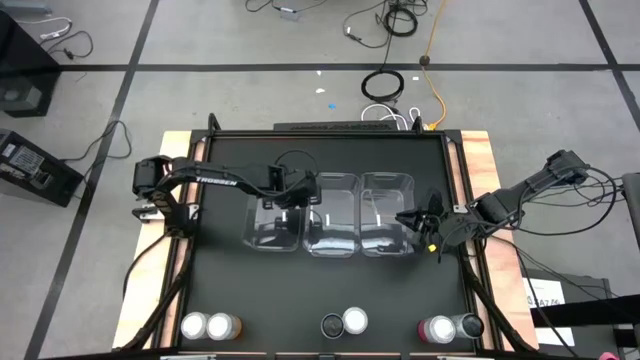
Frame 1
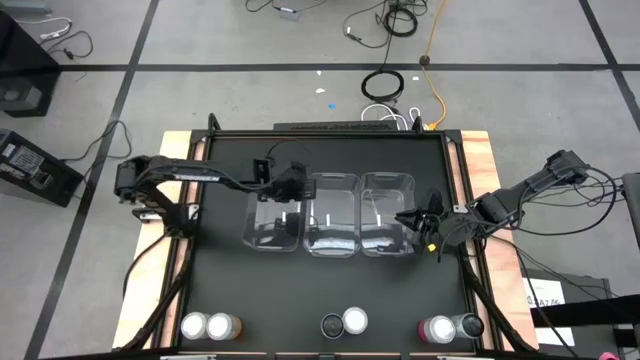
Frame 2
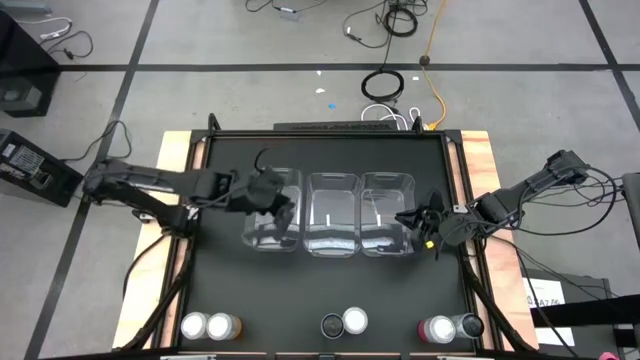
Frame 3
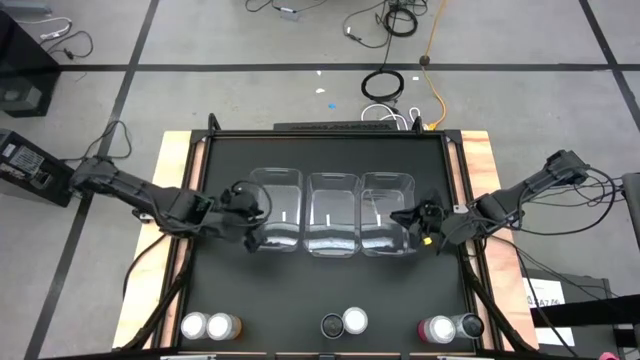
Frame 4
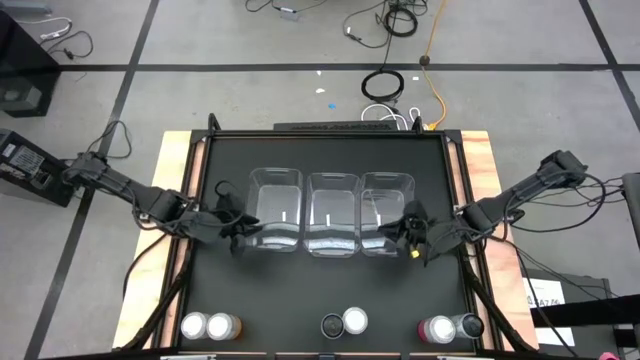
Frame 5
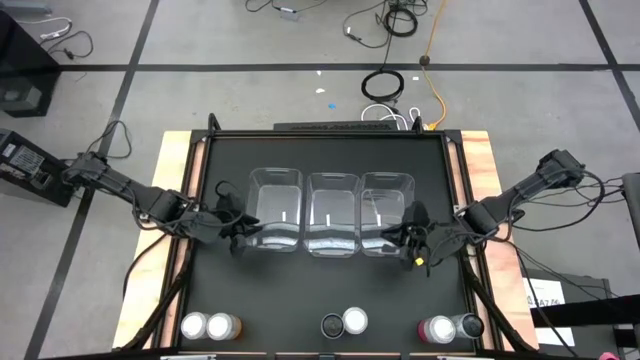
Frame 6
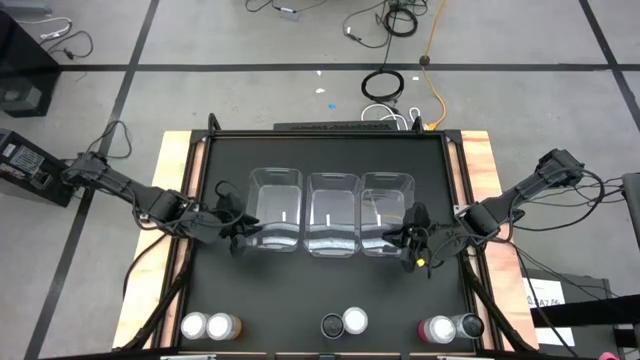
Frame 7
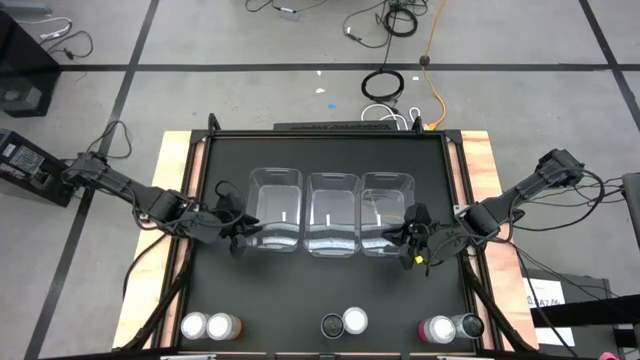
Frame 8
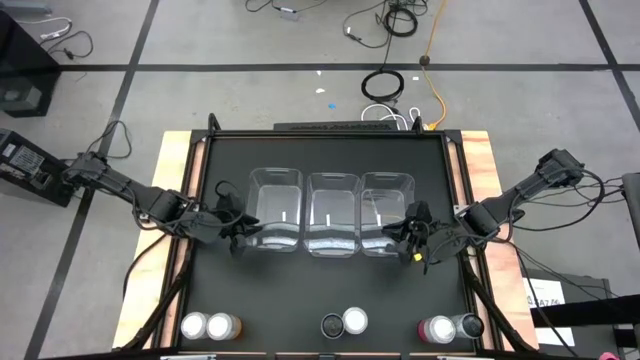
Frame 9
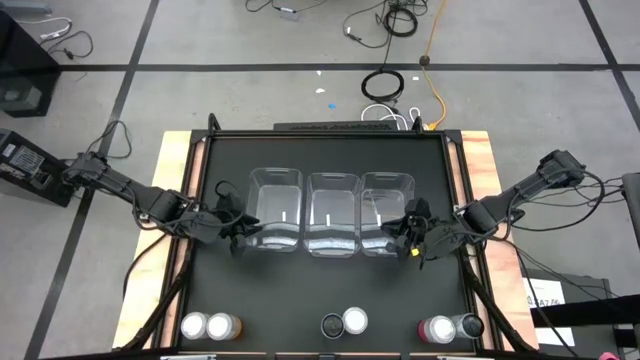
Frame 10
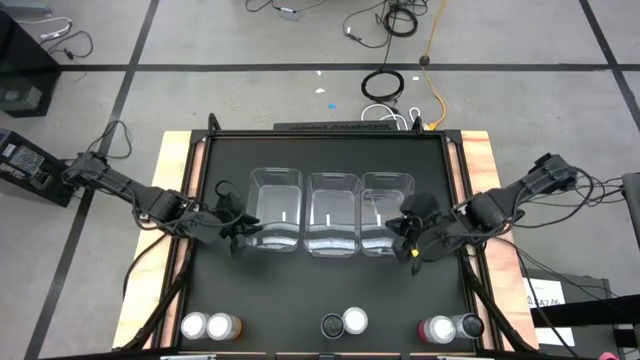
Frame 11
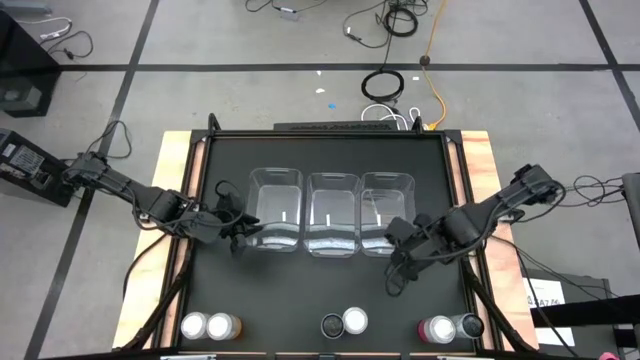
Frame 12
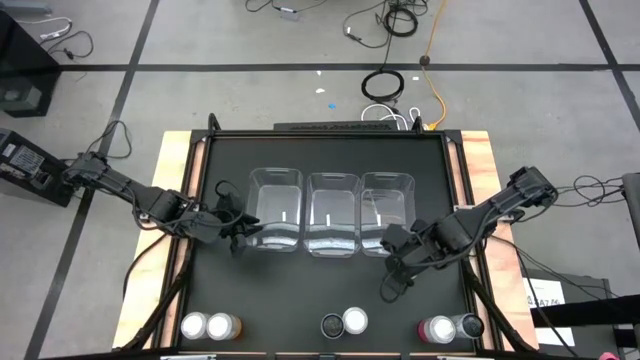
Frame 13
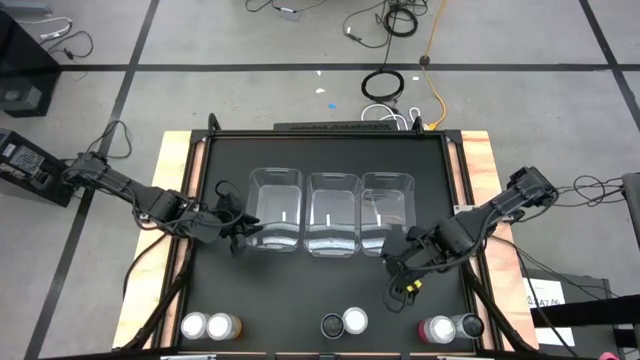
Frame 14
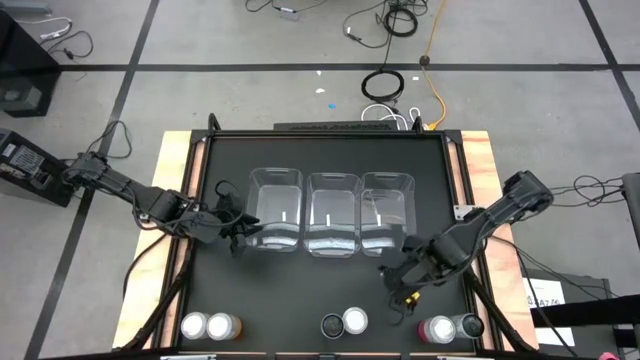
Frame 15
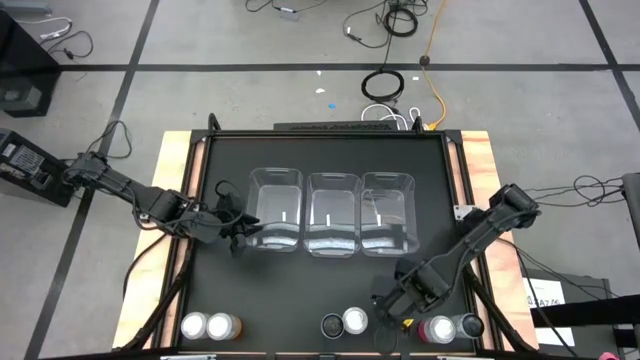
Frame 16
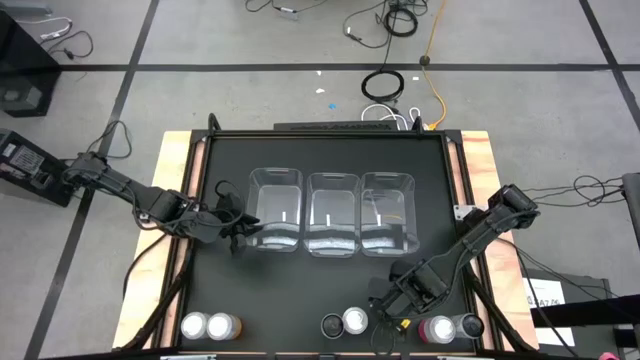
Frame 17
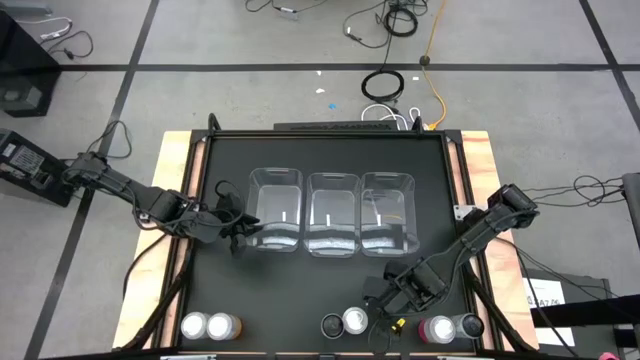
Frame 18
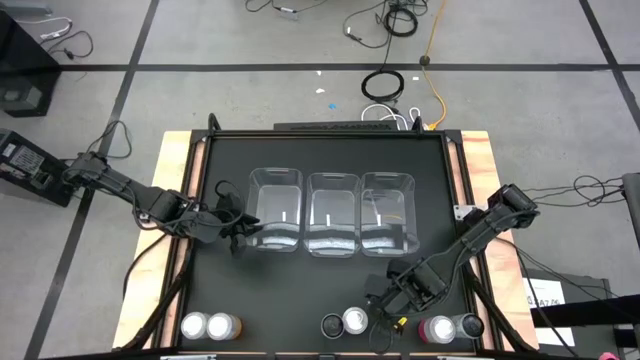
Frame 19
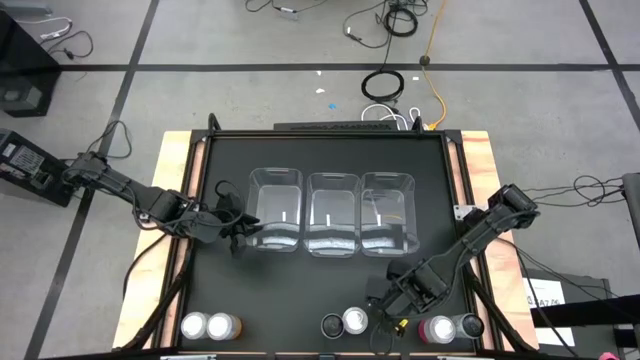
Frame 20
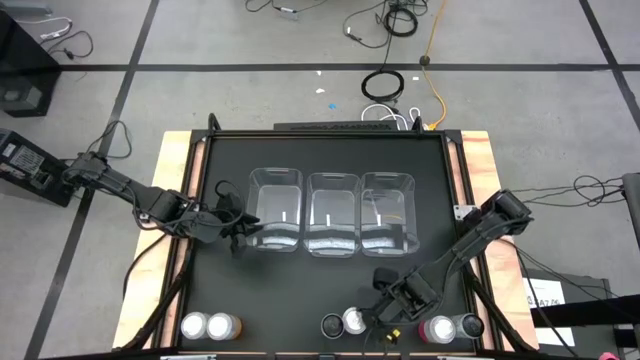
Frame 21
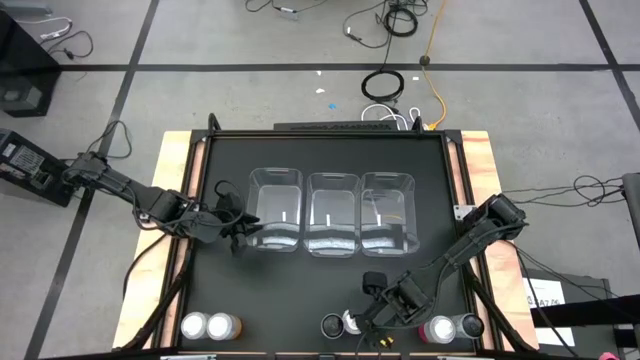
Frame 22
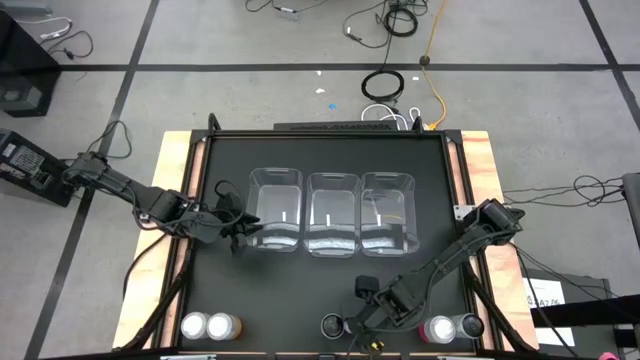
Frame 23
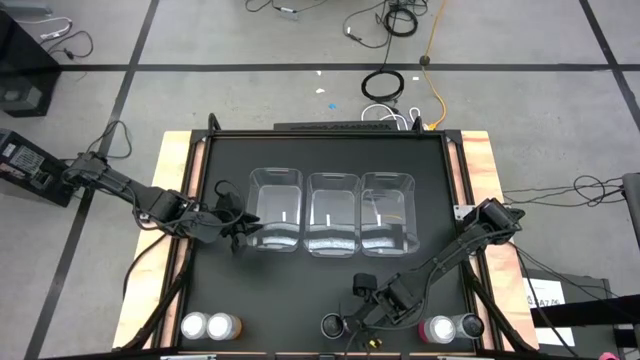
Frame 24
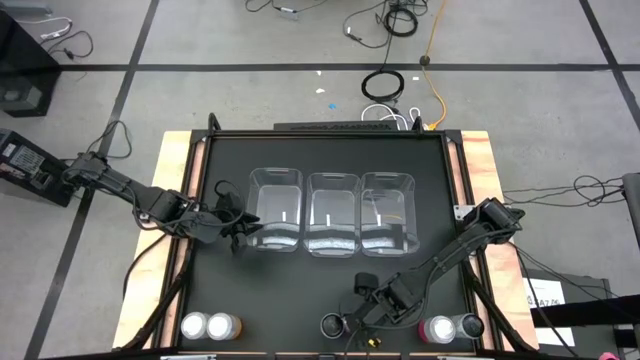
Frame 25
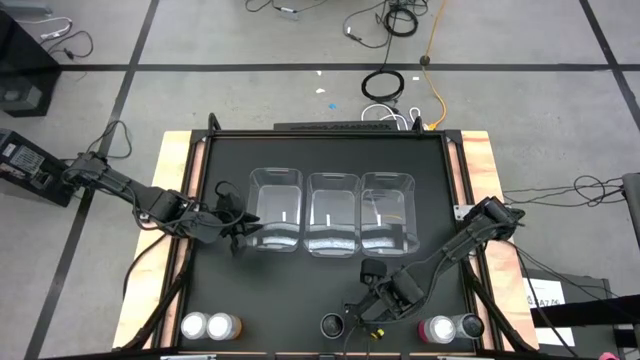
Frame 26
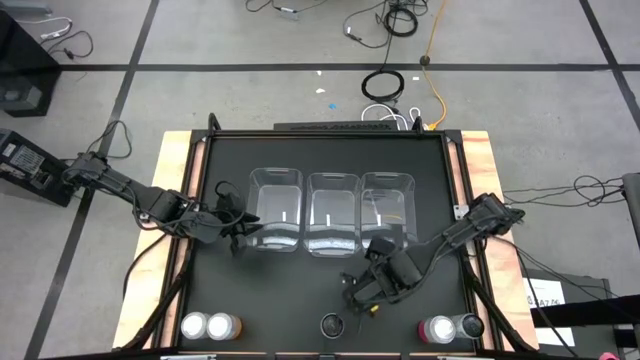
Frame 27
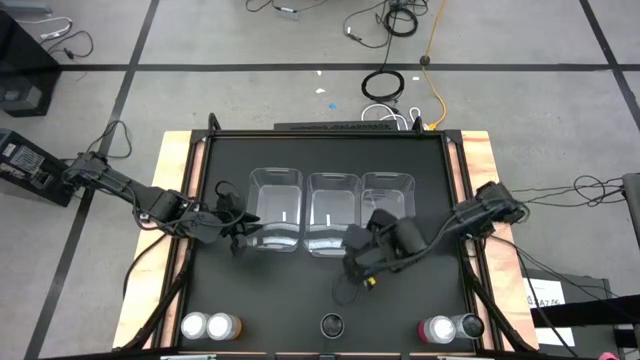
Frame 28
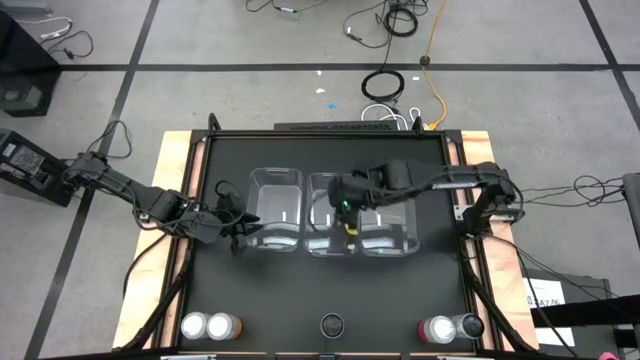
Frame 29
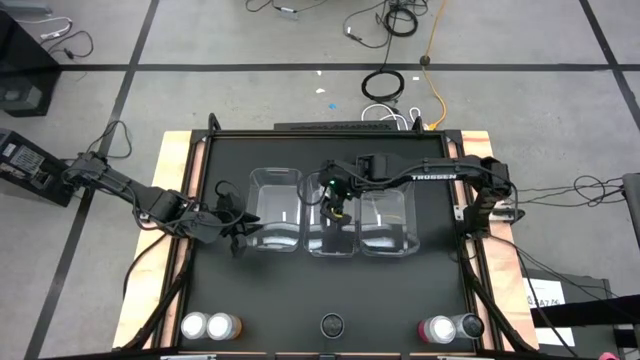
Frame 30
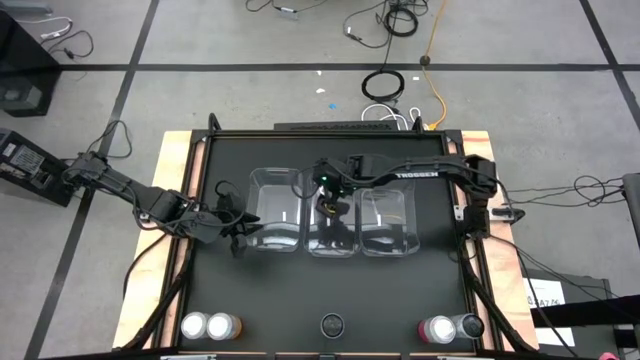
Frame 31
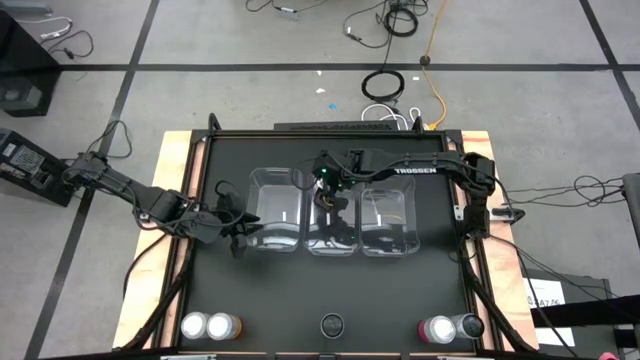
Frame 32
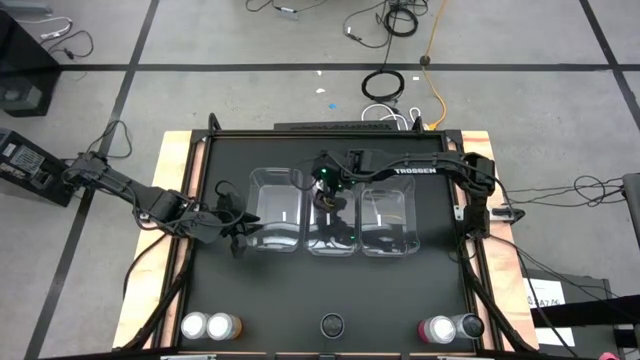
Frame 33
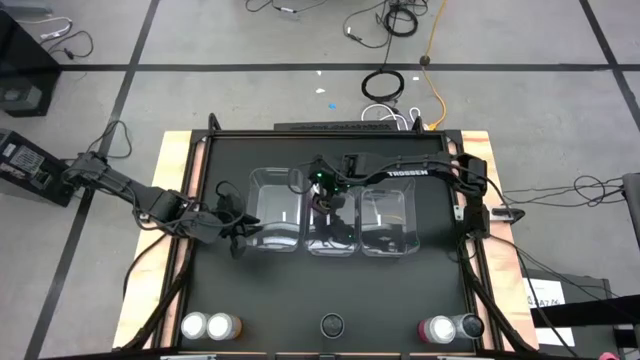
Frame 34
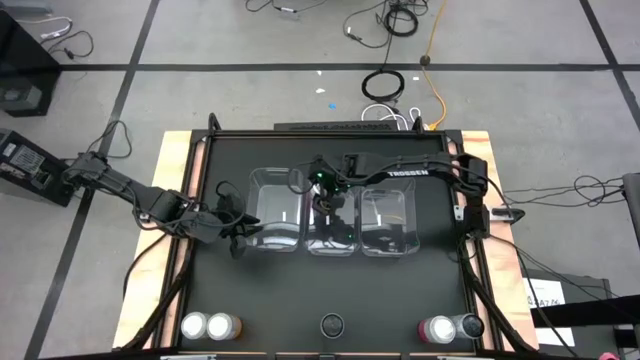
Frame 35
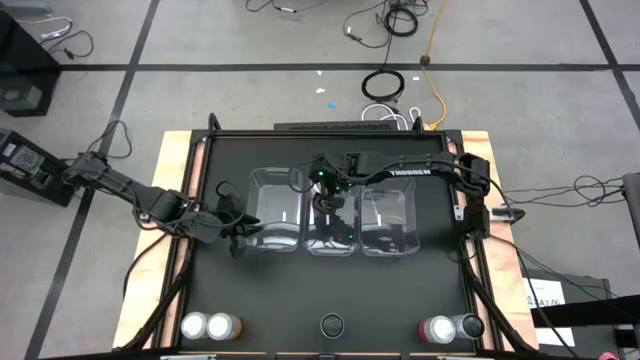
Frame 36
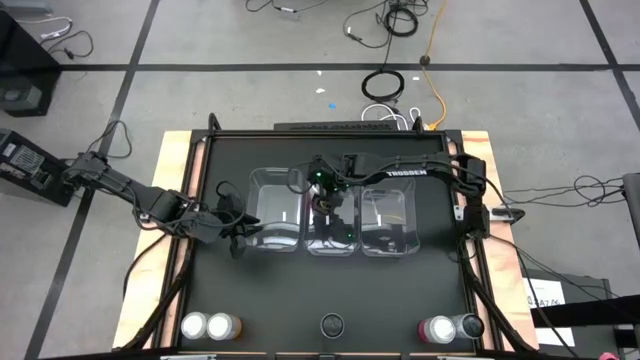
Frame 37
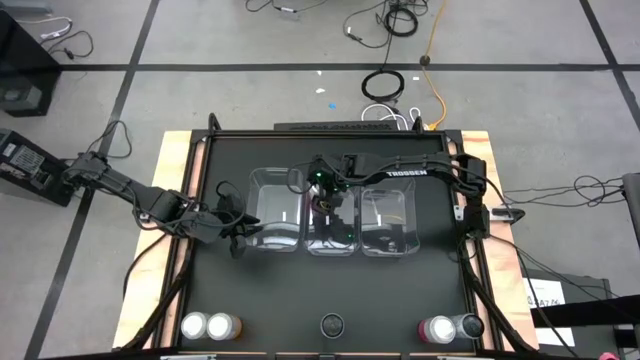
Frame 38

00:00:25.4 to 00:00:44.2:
Task: Sort soda cans
Put the left pink-white soda can into the center transparent bin
